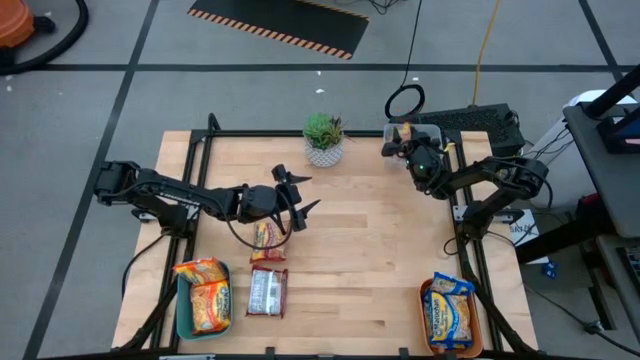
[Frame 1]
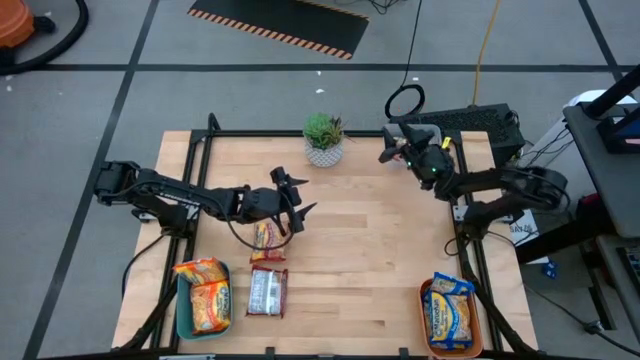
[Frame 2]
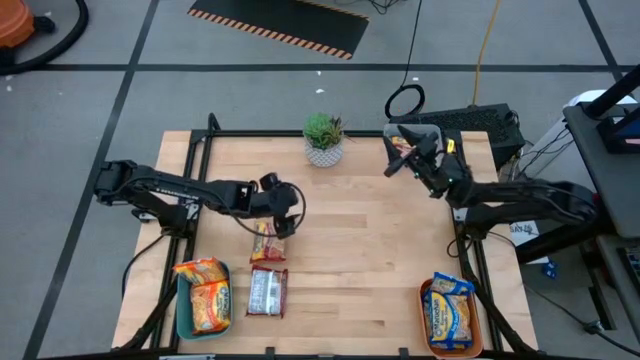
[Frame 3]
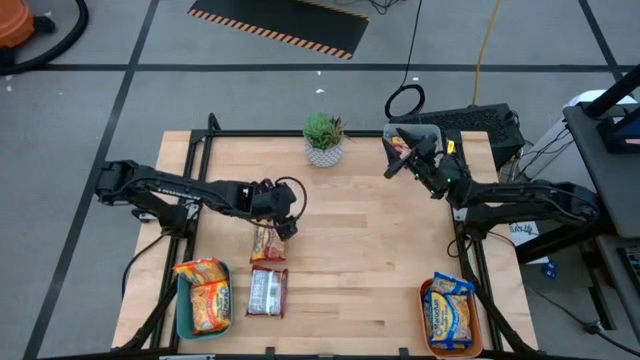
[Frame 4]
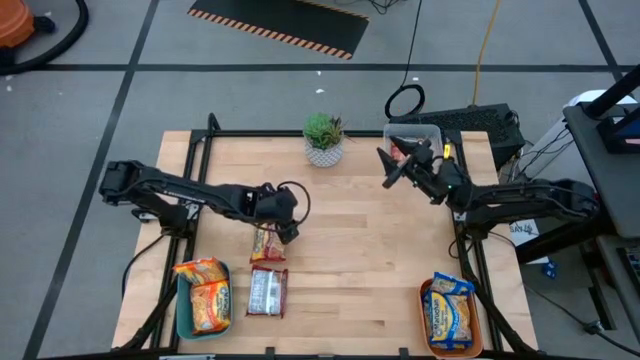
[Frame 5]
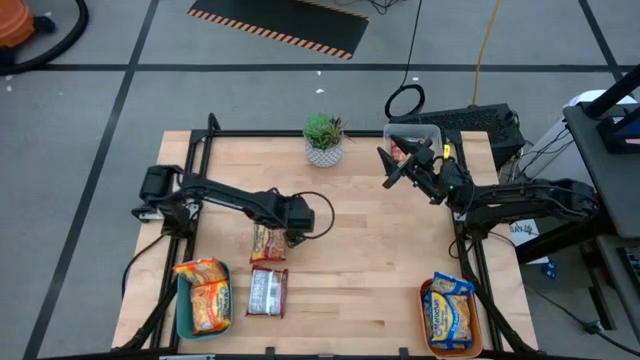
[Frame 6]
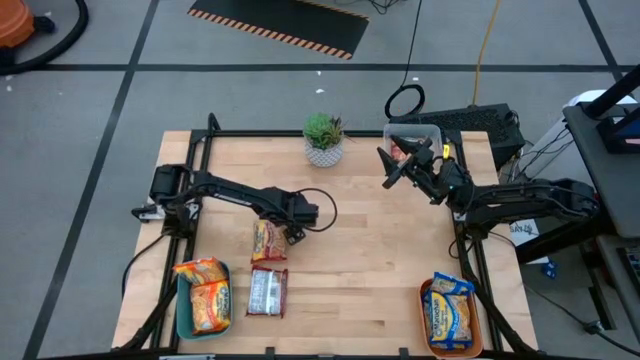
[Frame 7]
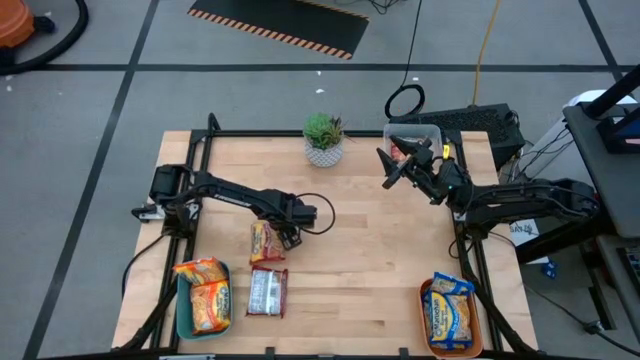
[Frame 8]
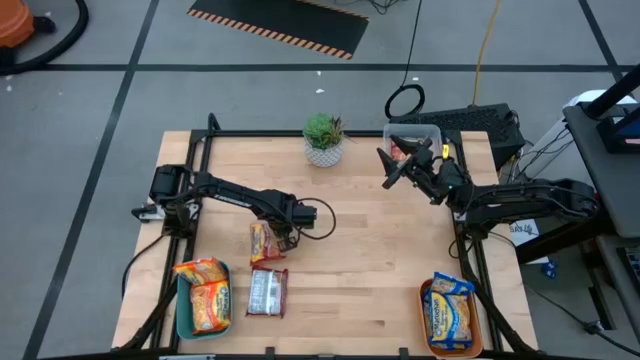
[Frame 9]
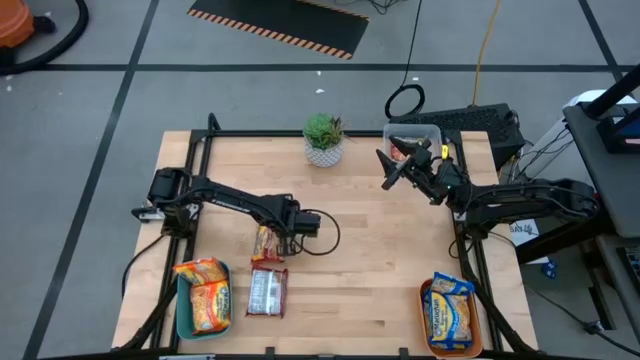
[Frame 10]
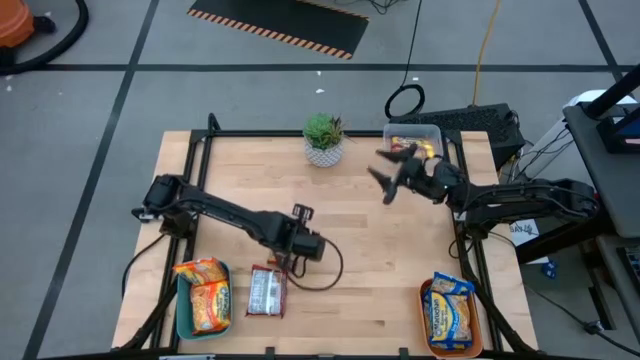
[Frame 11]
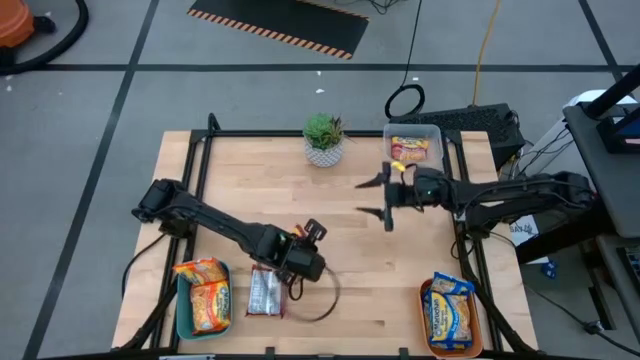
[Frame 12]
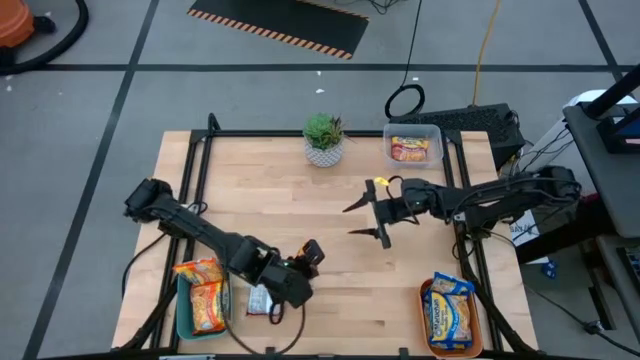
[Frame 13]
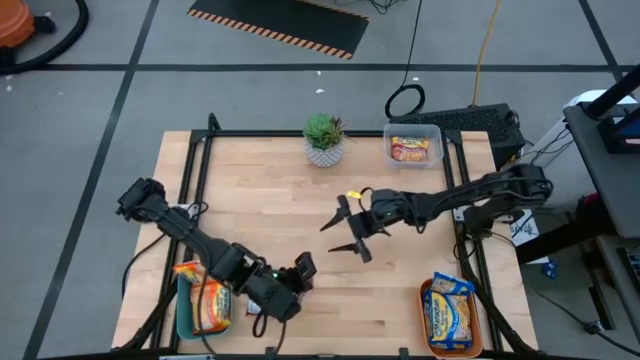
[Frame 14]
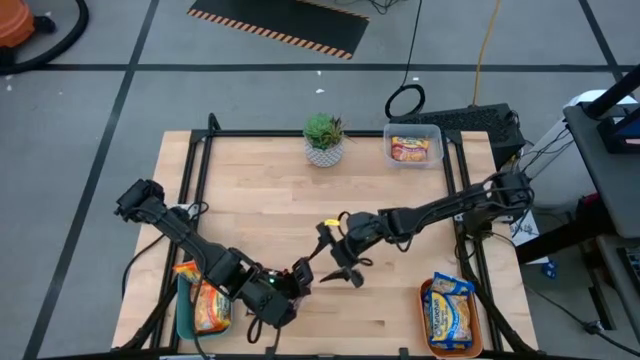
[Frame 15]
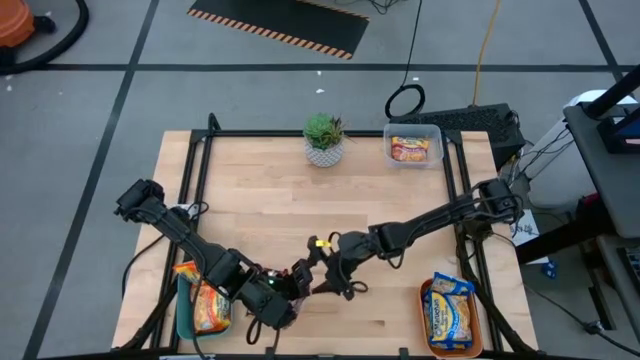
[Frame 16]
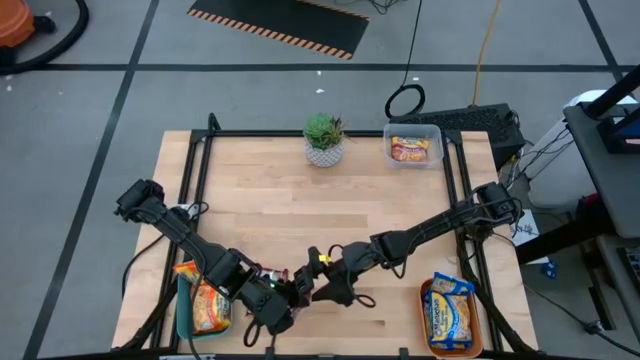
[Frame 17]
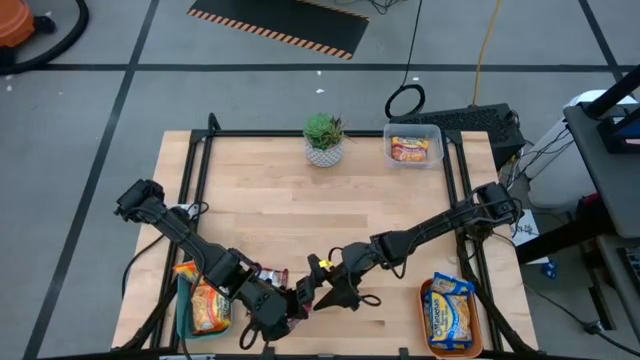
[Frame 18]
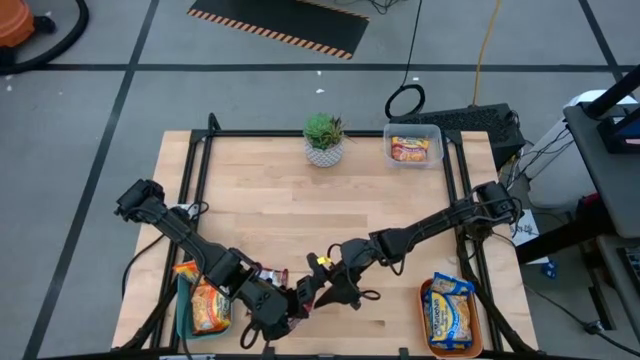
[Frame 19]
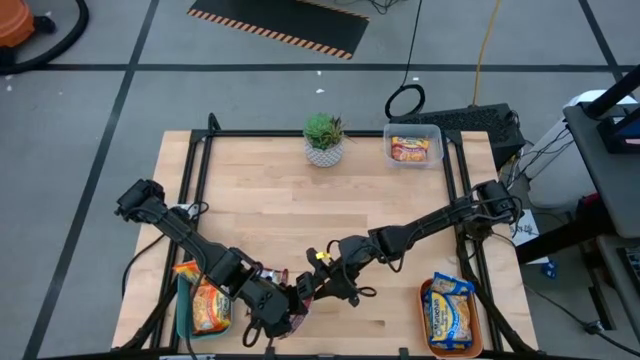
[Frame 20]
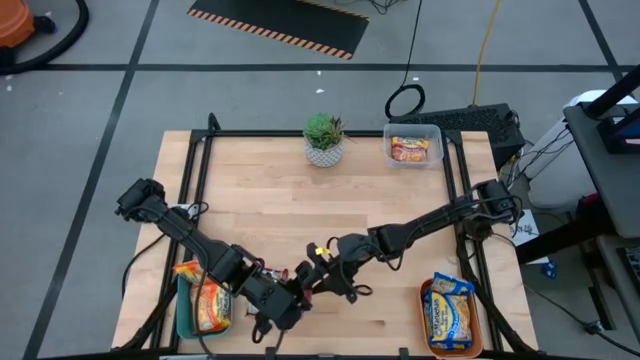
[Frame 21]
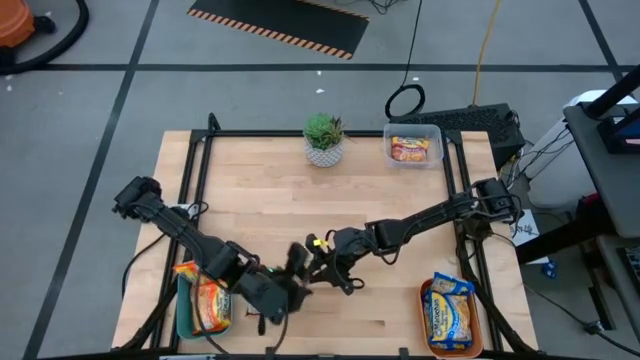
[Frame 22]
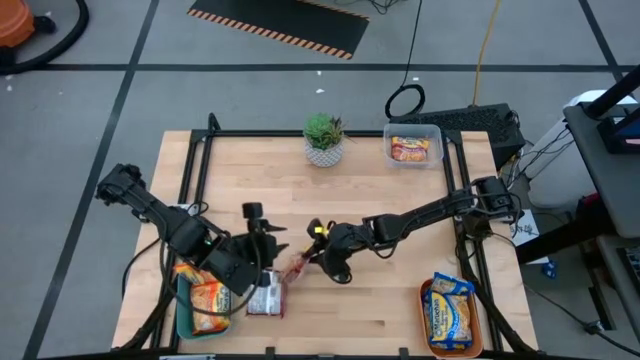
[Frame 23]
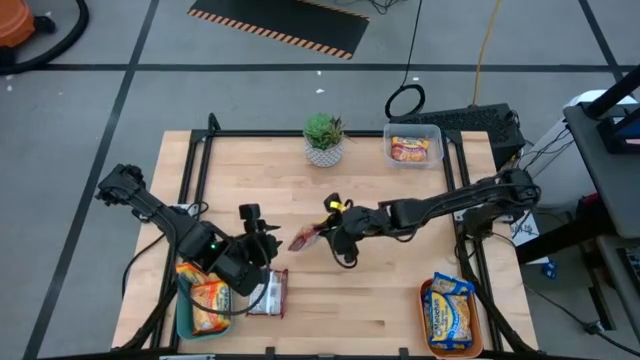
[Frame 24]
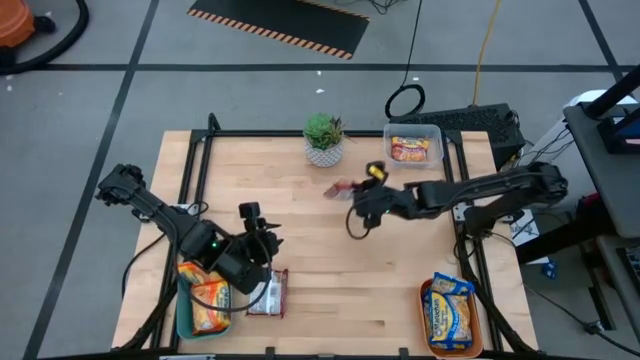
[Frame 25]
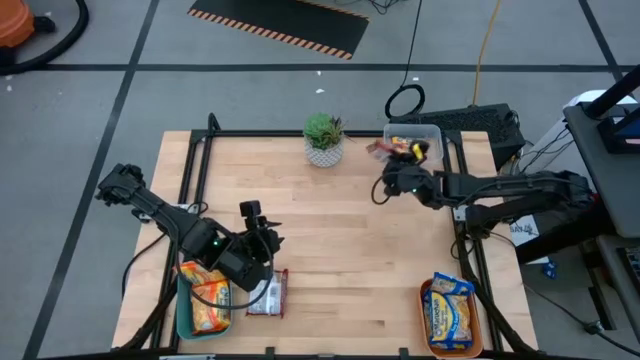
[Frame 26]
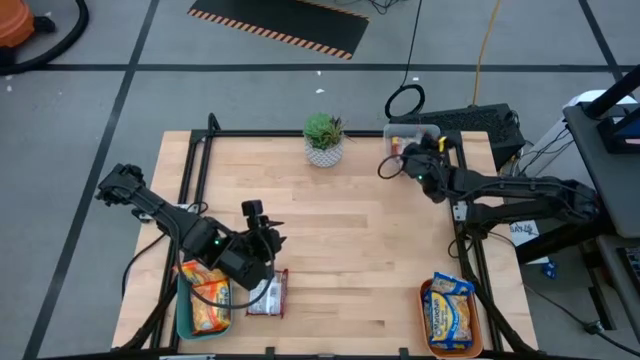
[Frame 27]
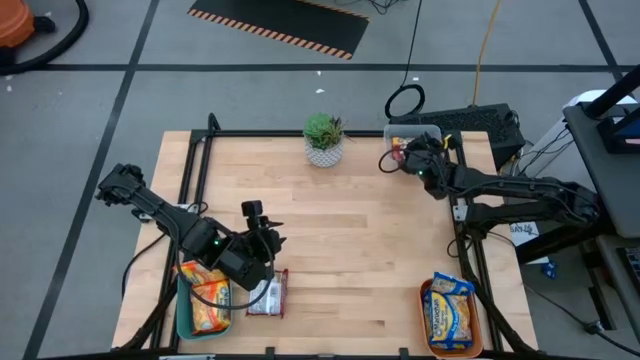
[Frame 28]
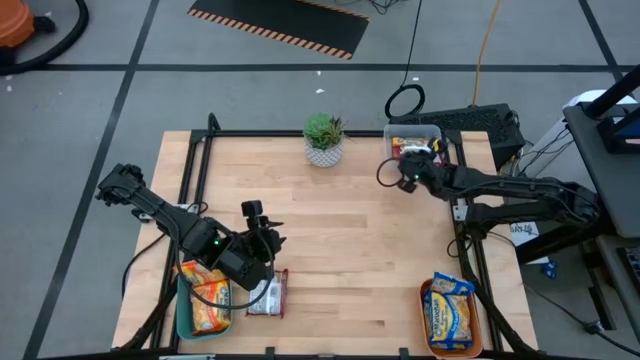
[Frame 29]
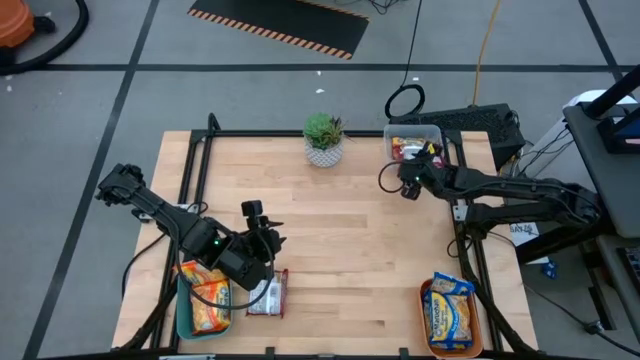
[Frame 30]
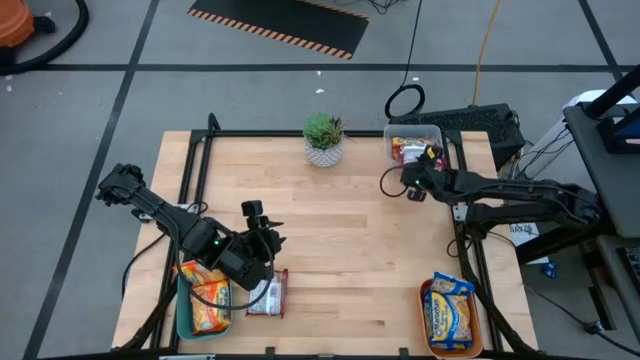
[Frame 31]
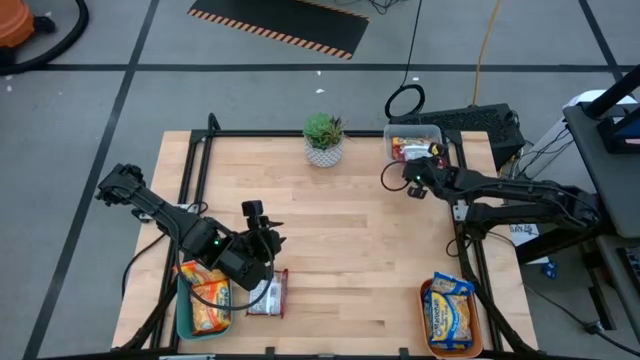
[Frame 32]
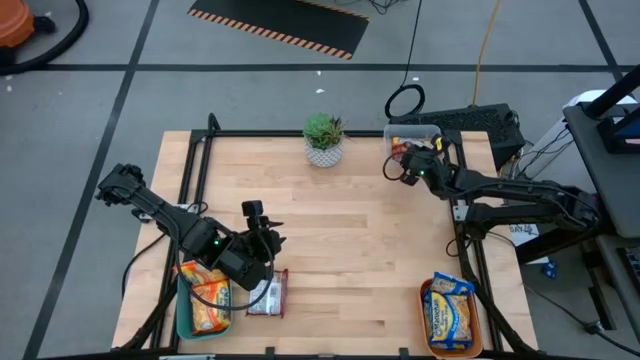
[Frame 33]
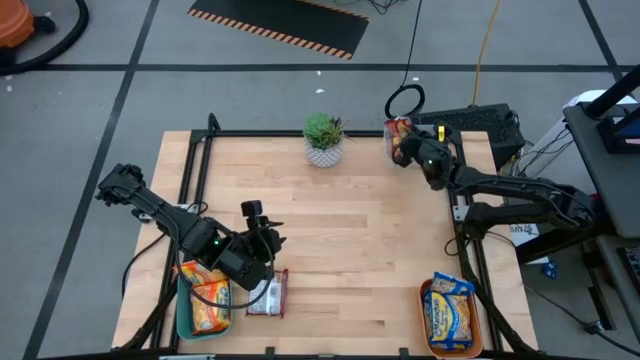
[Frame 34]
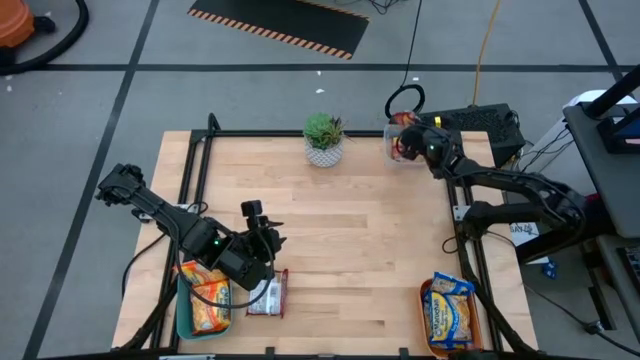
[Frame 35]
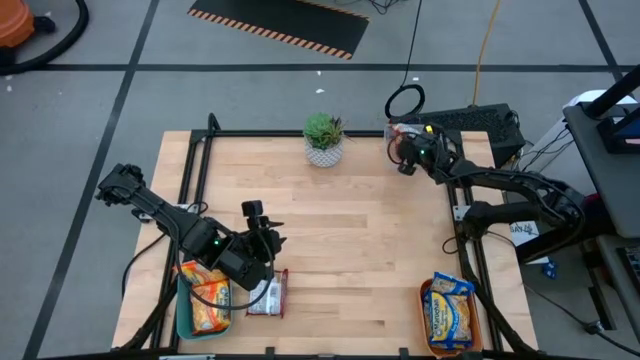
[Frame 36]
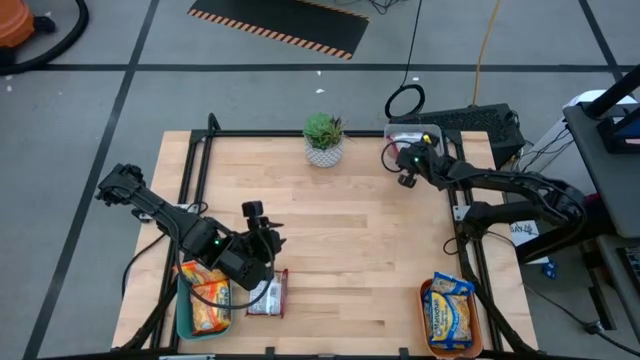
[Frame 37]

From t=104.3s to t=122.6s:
Task: Sort Maruchan noodles
Put the top red noodle pack into the transparent bin

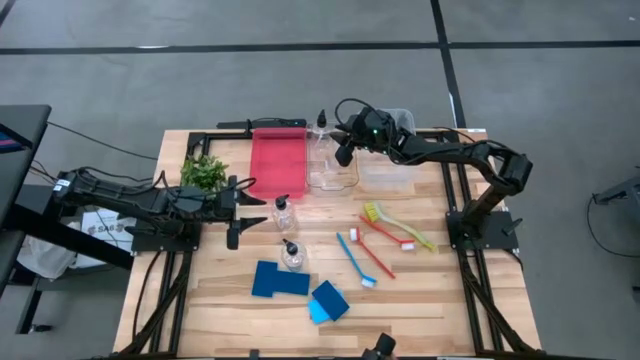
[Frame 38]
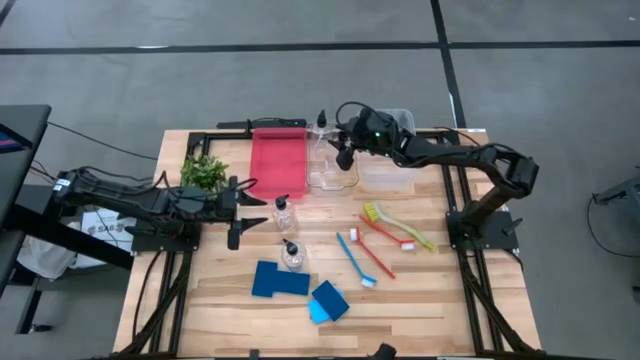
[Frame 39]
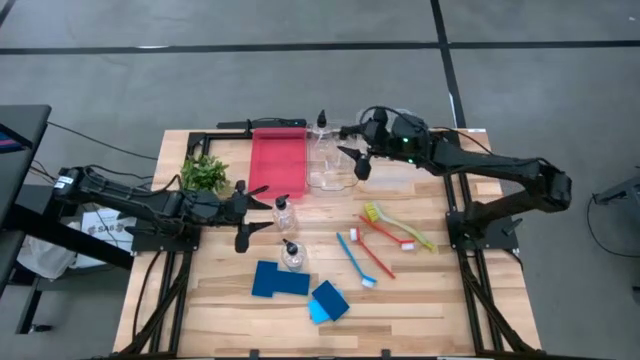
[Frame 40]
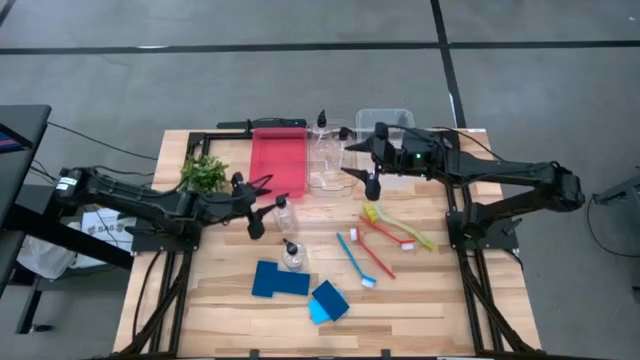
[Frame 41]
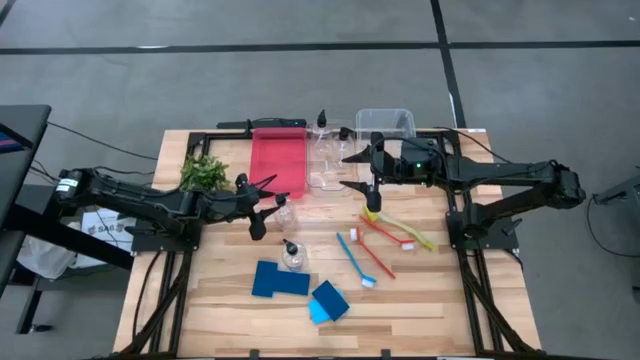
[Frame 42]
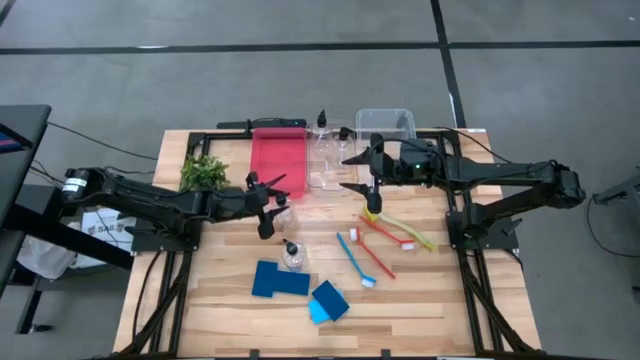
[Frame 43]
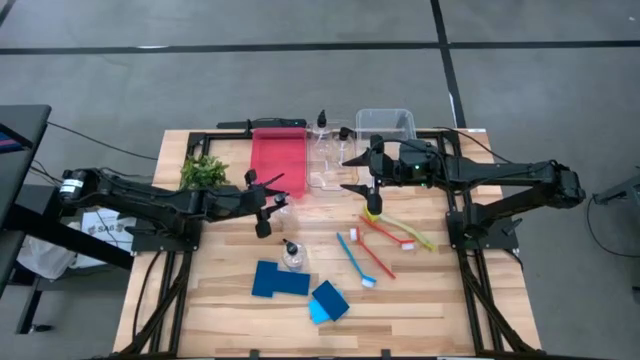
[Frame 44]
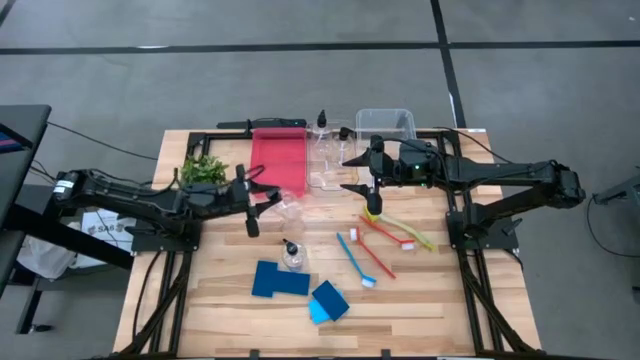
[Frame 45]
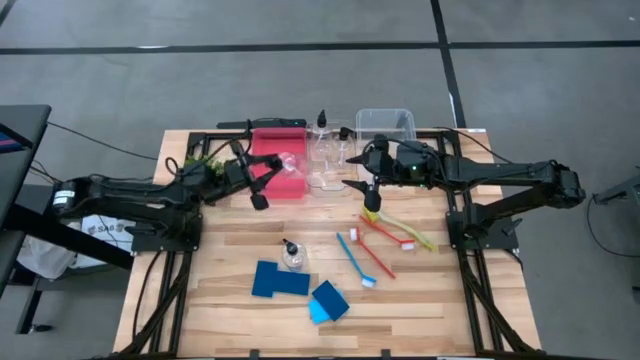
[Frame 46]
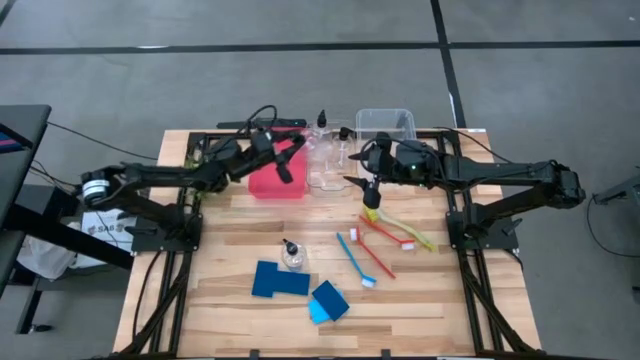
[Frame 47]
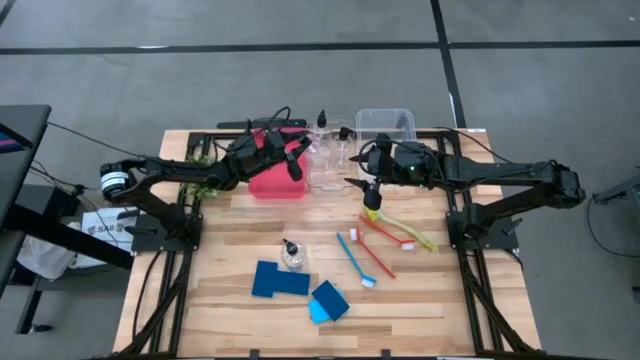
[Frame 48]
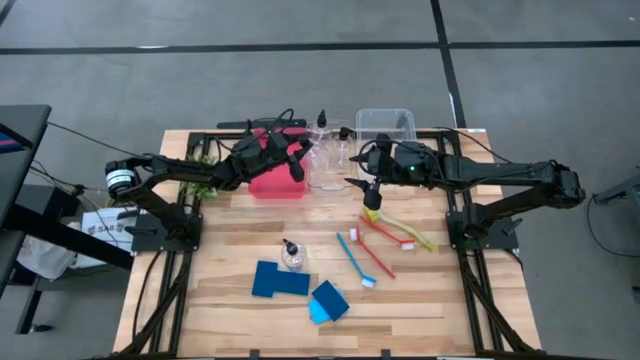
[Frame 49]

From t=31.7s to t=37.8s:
Task: Pick & Place Kitchen Sink Supplies
Put the soap dispenser into the left transparent bin
